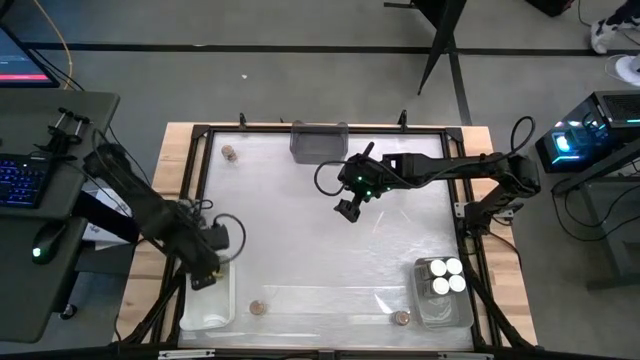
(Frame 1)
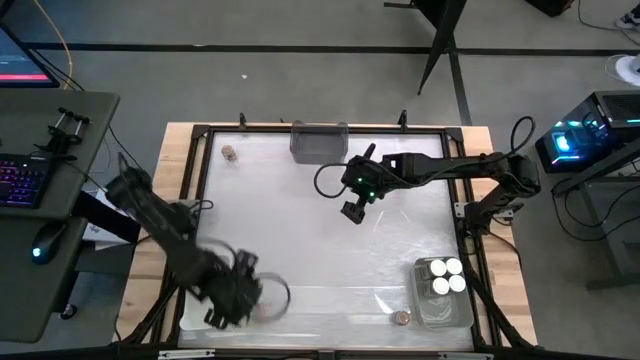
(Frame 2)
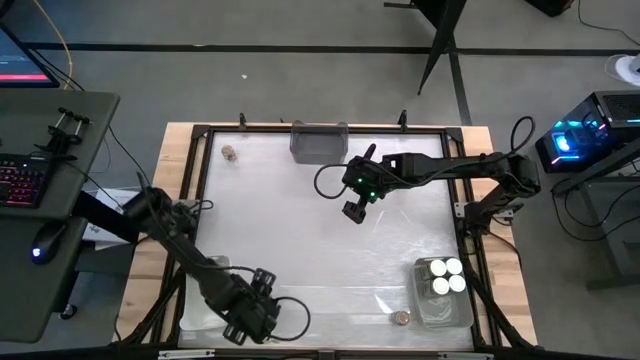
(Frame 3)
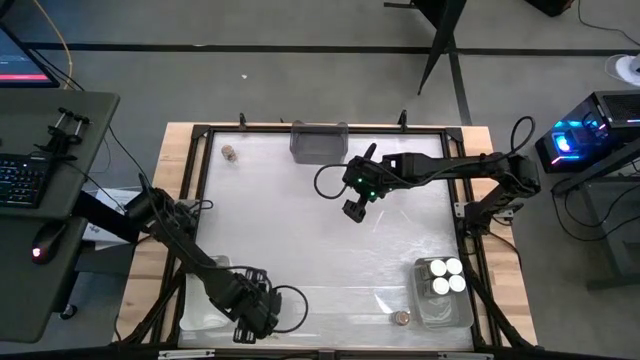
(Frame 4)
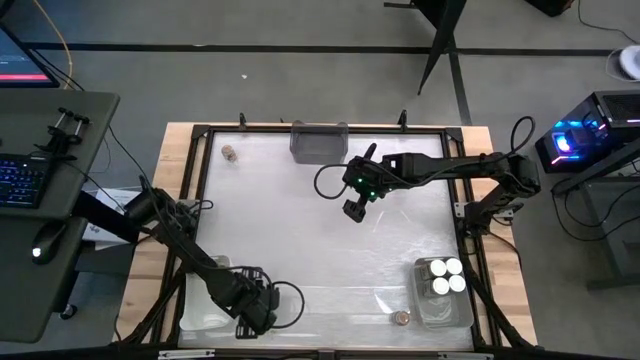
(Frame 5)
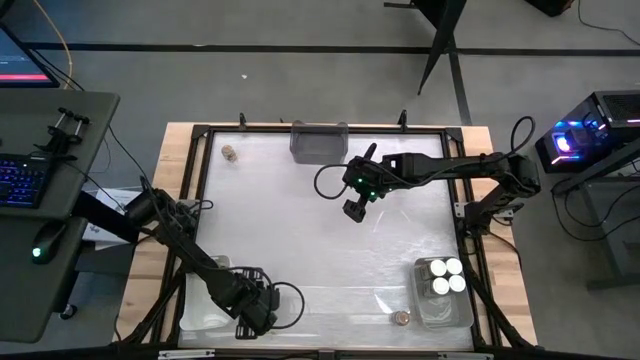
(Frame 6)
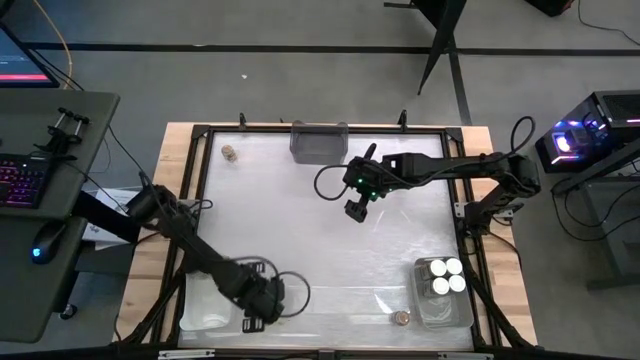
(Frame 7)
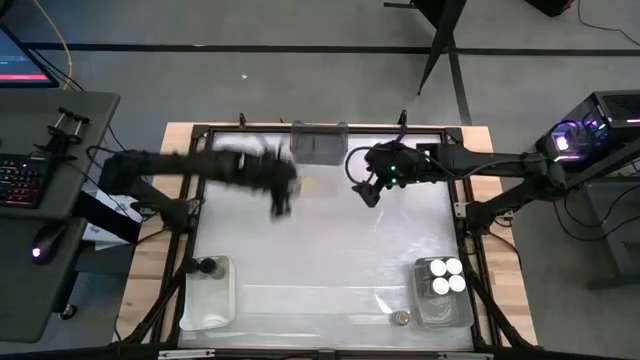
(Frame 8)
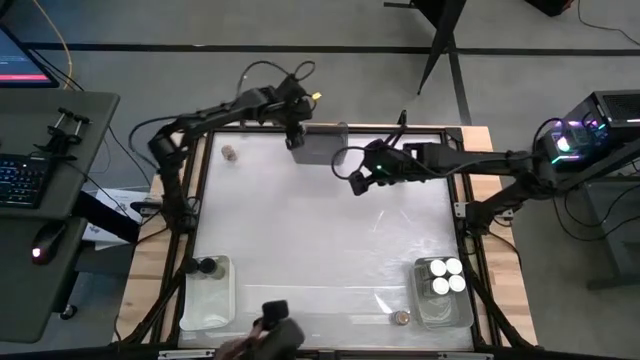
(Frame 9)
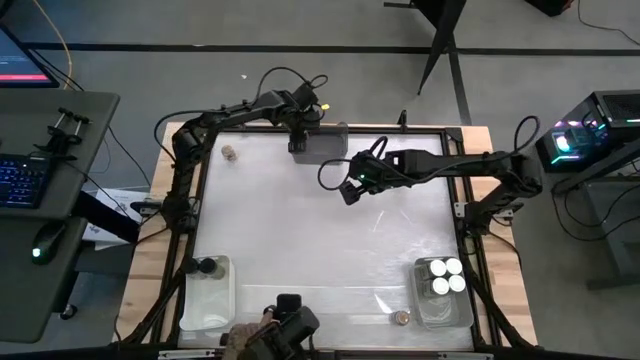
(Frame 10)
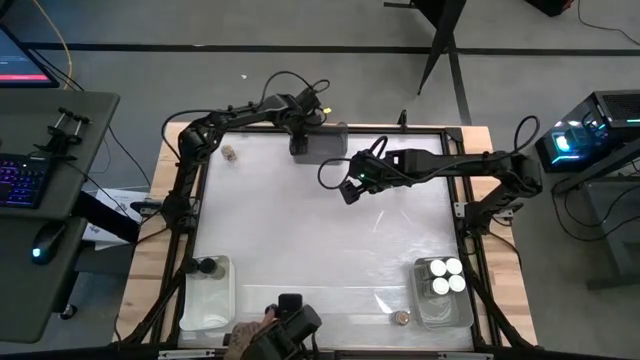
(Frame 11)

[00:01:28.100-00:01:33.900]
Task: Sort spices by type
Put the bottom left brown seasoning bottle into the black bin

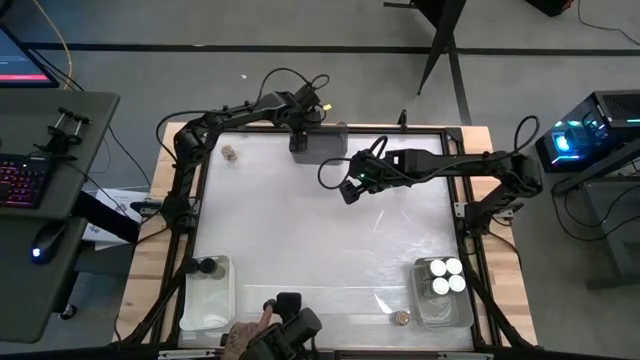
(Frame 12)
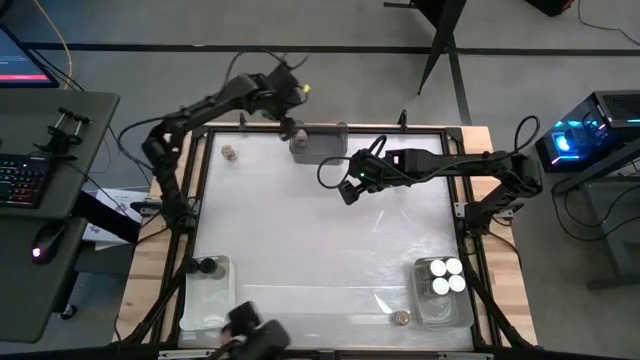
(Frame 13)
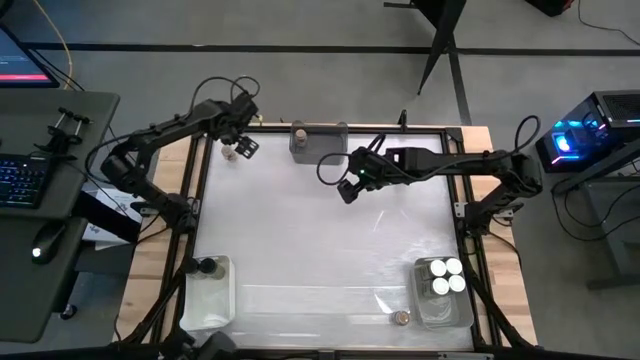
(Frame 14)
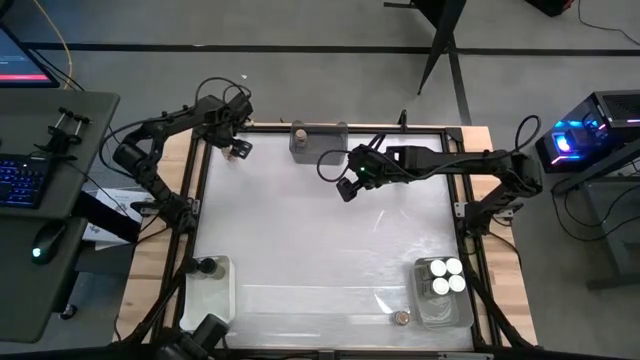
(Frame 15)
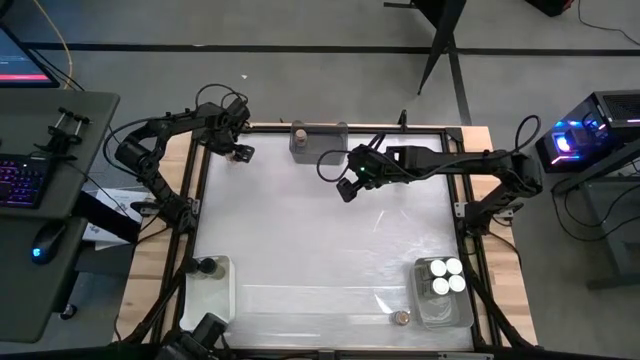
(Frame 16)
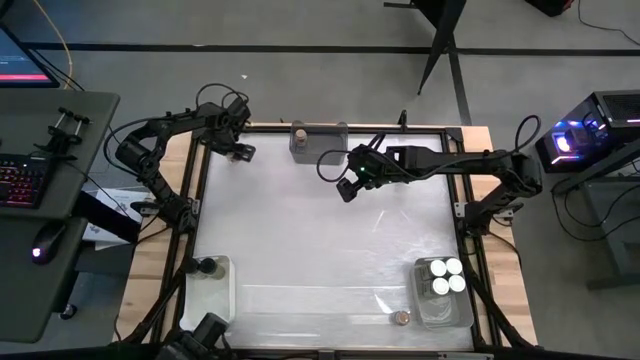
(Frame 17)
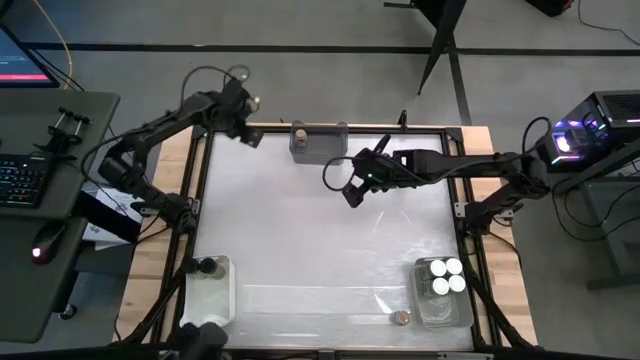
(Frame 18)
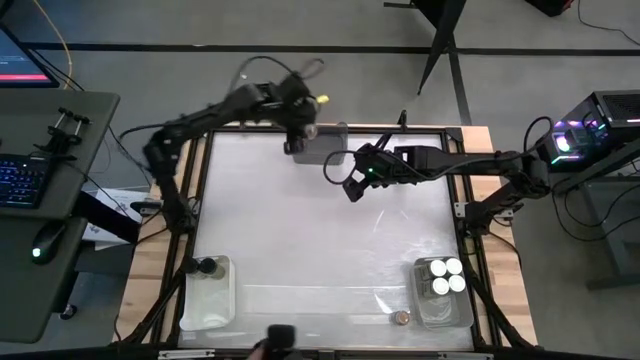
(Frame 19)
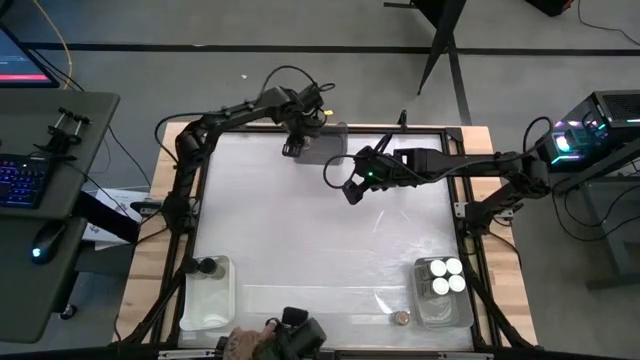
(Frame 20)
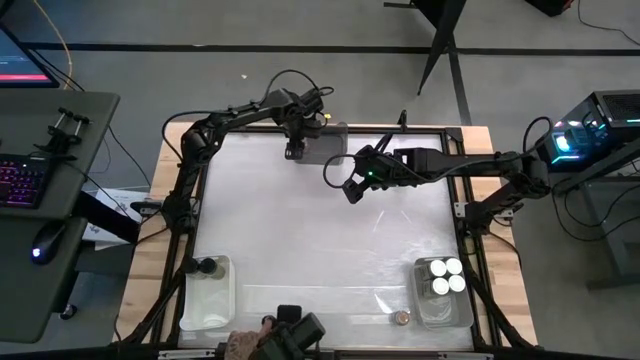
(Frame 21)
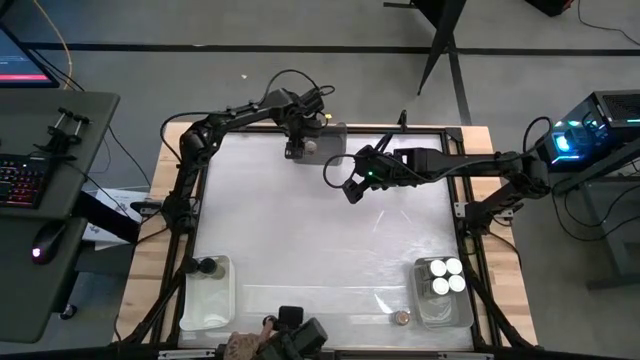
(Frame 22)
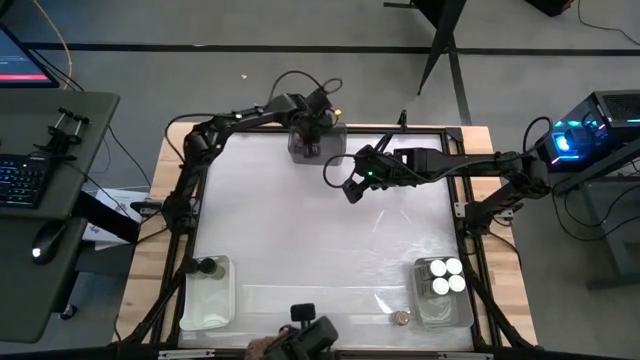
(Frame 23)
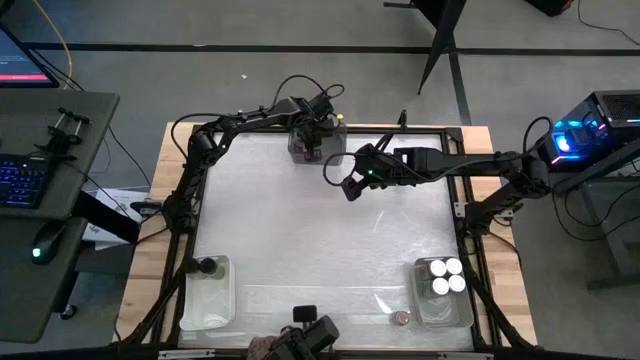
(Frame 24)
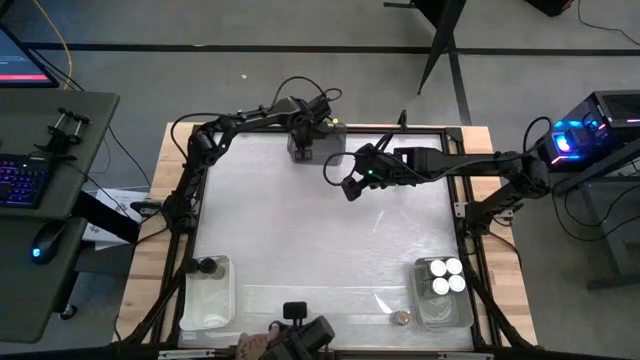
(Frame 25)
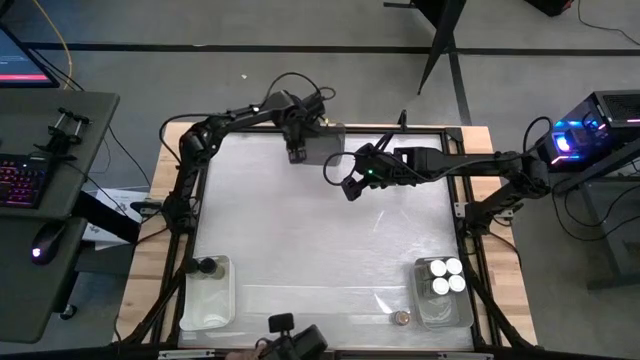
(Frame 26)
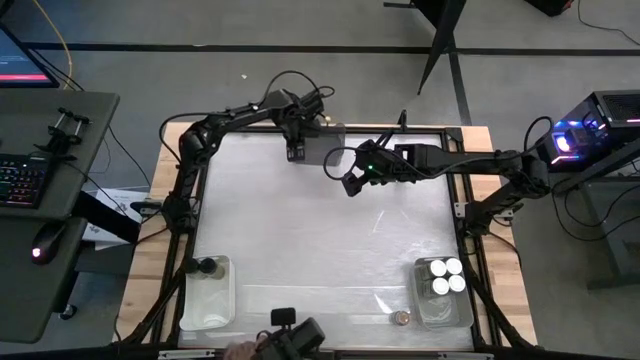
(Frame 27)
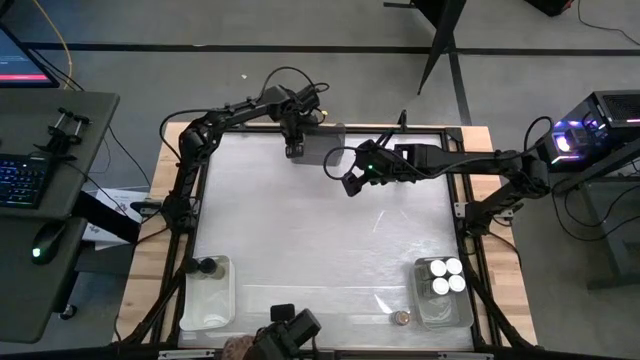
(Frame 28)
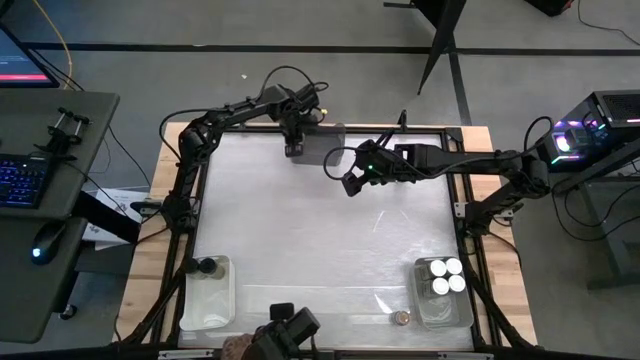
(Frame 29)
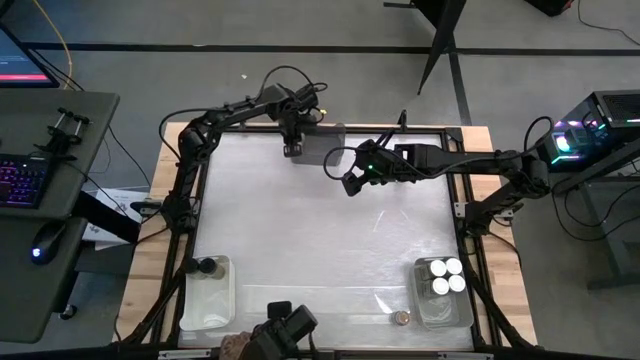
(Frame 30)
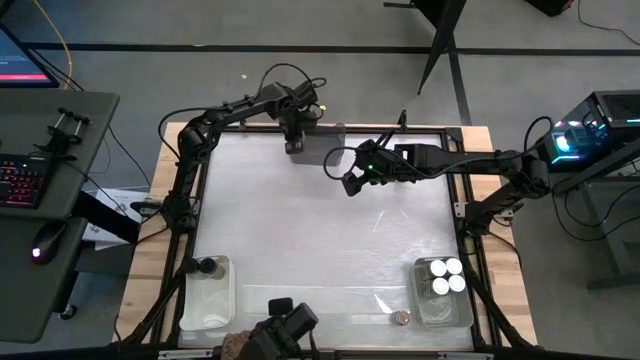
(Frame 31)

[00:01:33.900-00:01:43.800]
Put the left brown seasoning bottle into the black bin

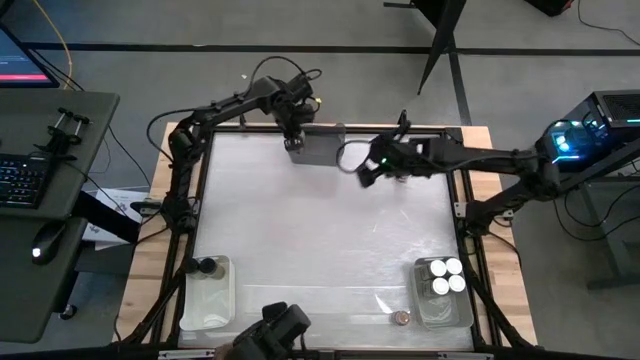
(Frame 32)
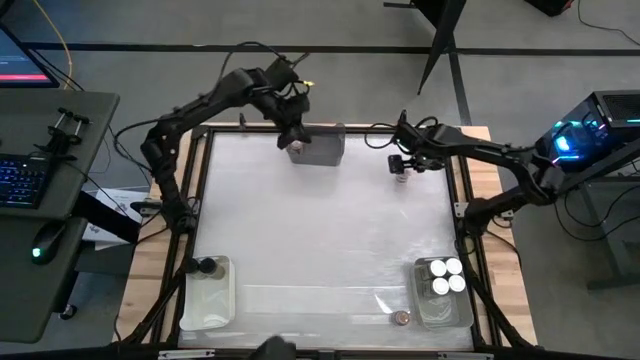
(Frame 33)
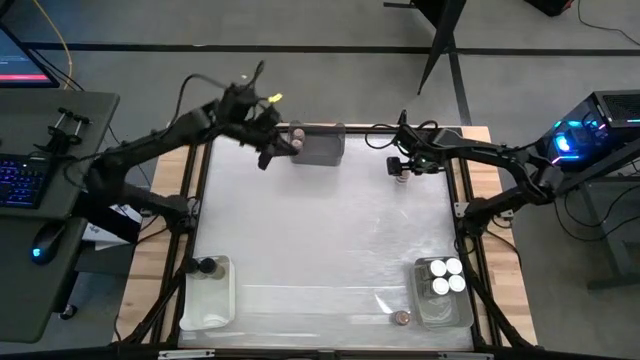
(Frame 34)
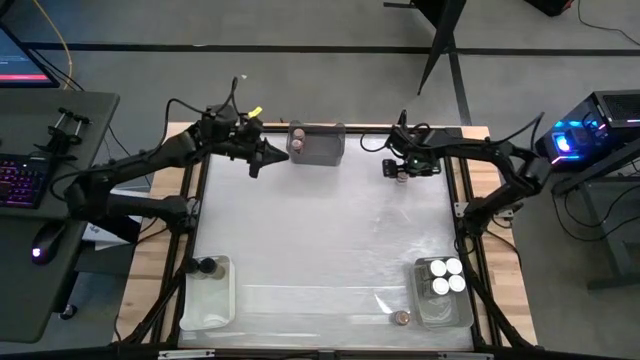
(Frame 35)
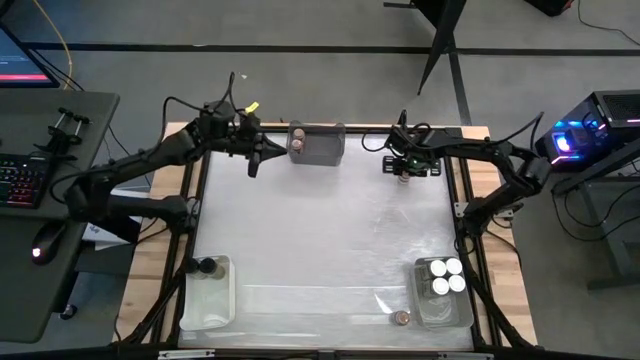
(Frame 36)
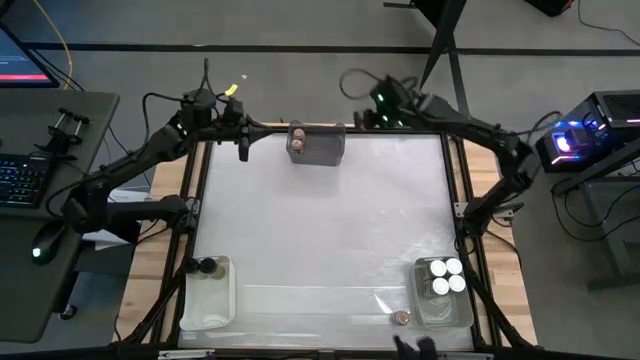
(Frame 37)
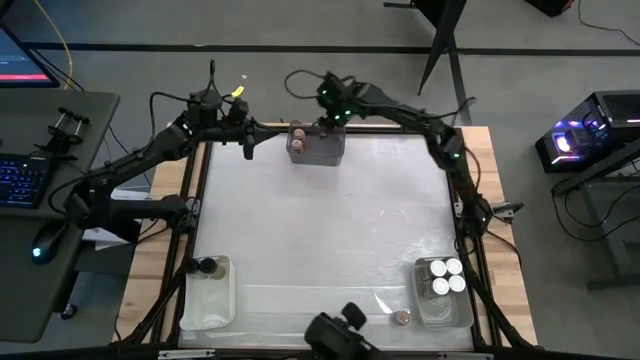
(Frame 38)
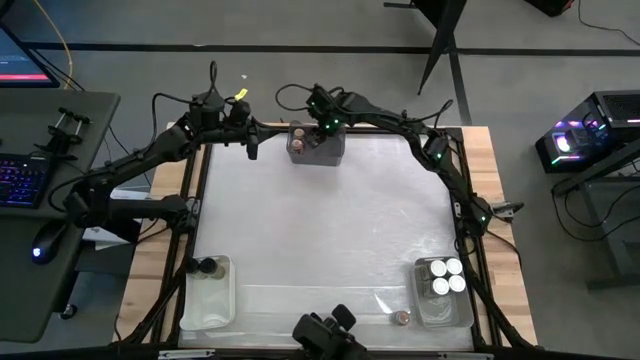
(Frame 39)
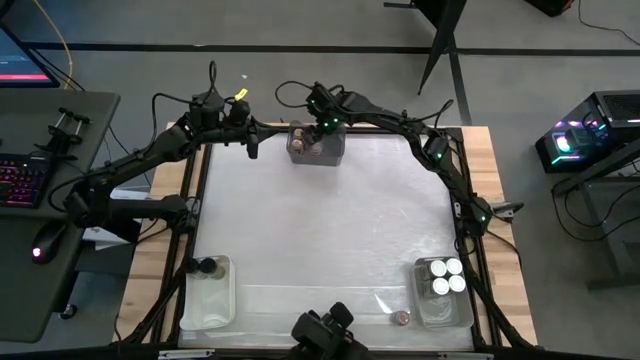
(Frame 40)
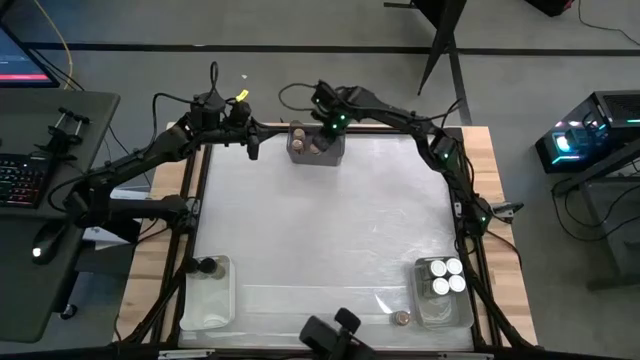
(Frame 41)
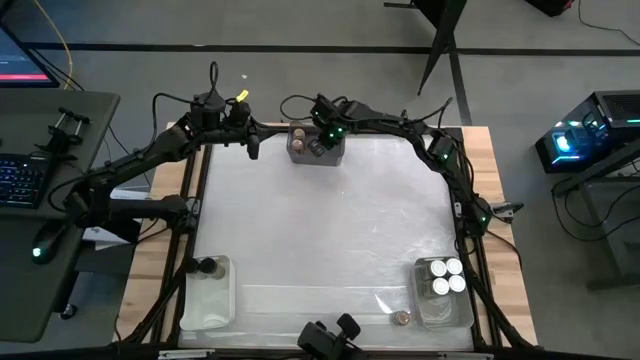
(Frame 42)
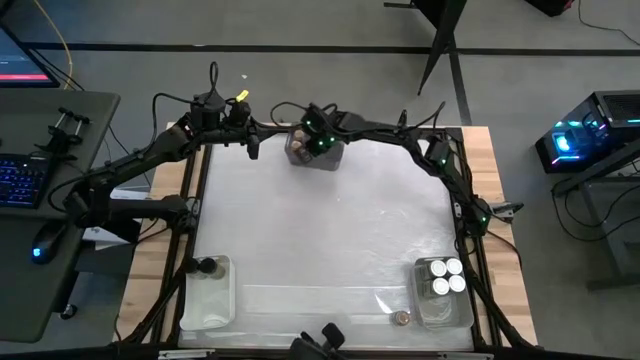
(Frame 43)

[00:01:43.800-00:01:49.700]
Put the top brown seasoning bottle into the black bin
